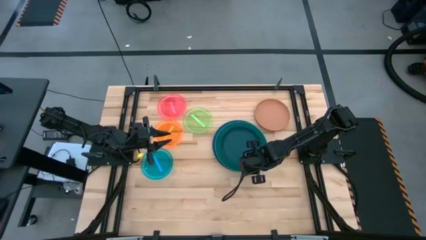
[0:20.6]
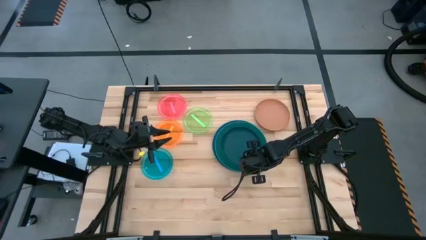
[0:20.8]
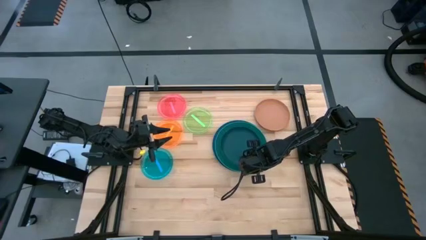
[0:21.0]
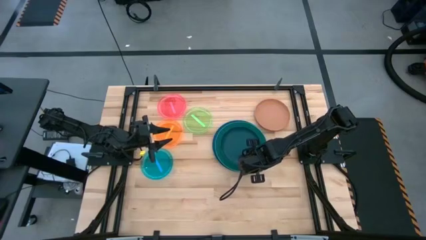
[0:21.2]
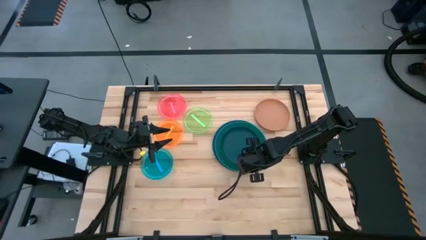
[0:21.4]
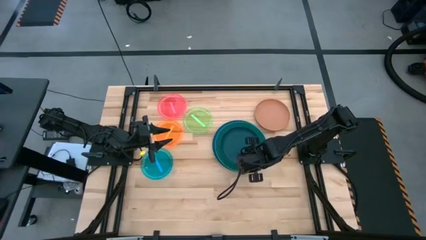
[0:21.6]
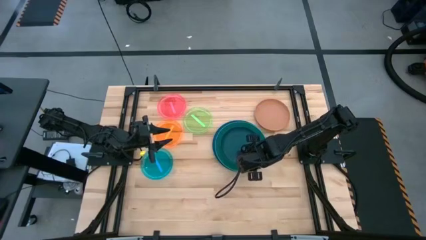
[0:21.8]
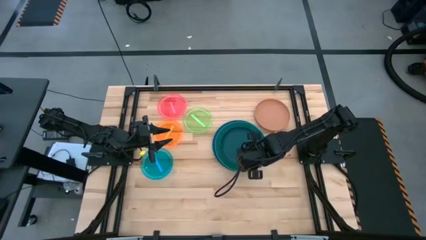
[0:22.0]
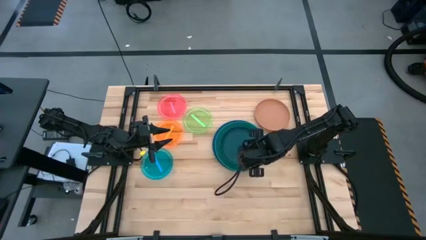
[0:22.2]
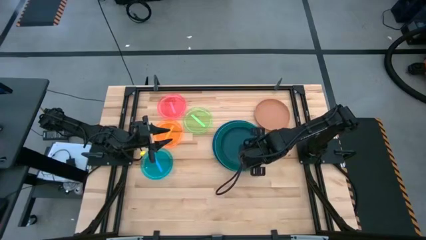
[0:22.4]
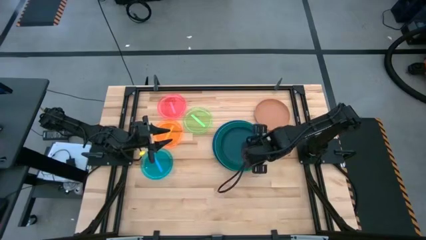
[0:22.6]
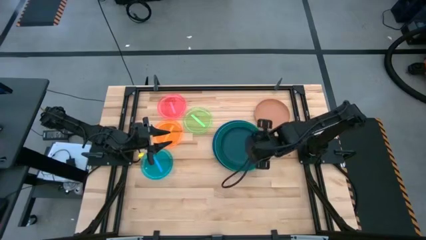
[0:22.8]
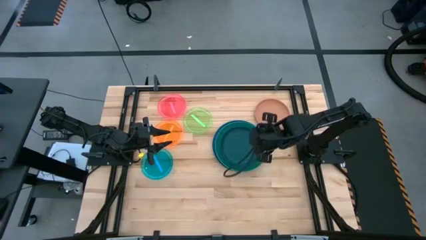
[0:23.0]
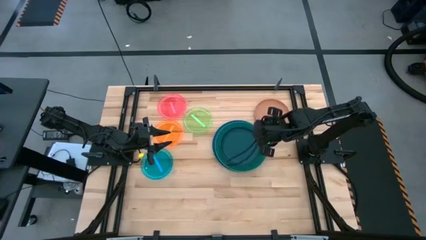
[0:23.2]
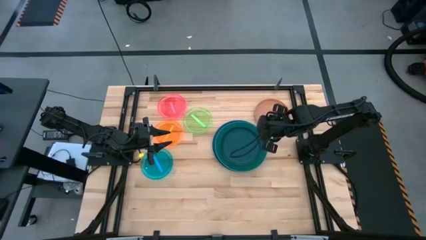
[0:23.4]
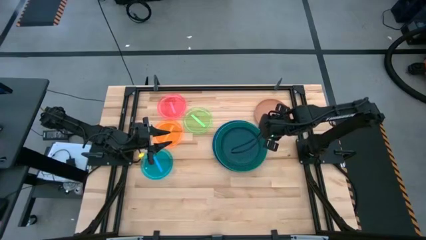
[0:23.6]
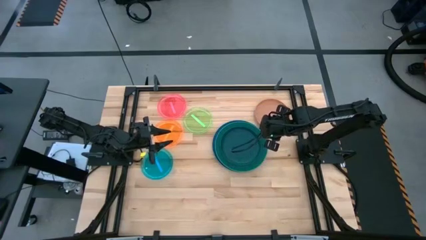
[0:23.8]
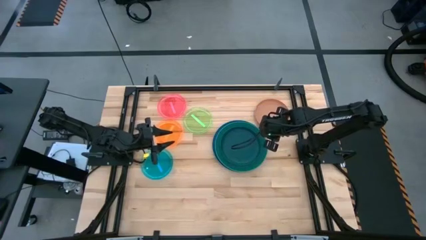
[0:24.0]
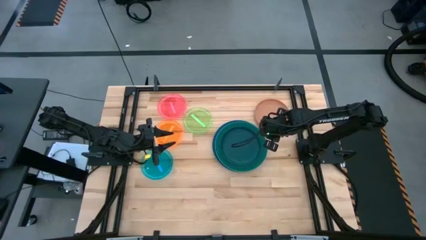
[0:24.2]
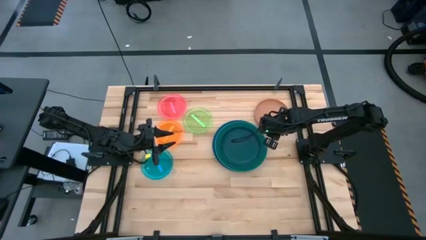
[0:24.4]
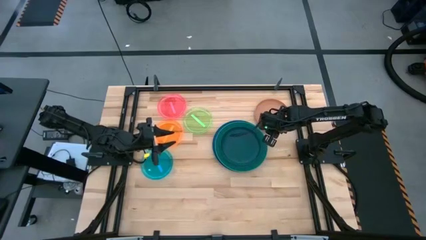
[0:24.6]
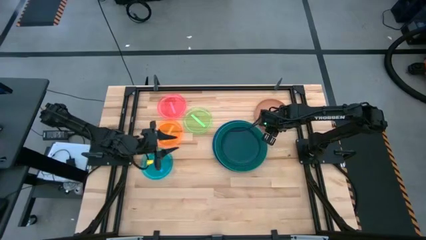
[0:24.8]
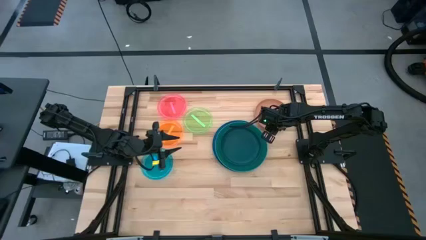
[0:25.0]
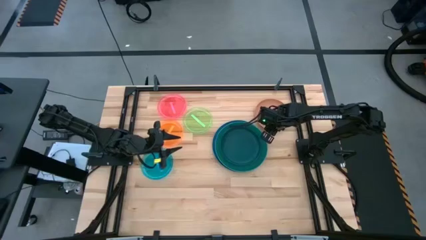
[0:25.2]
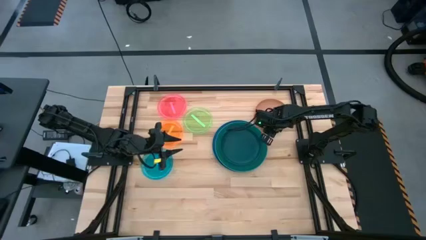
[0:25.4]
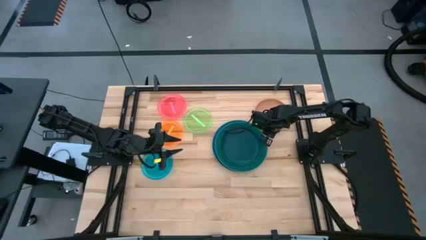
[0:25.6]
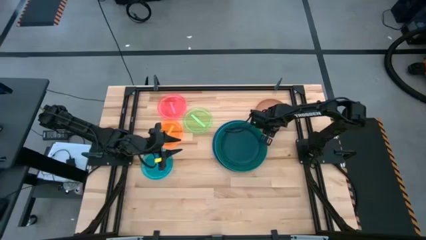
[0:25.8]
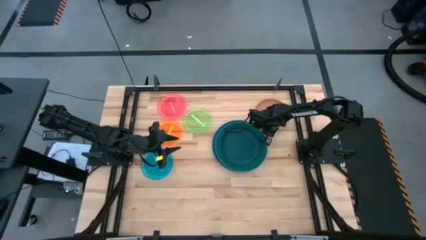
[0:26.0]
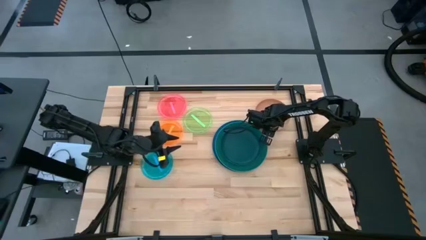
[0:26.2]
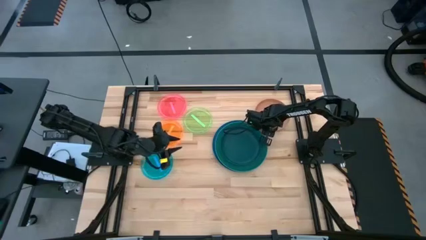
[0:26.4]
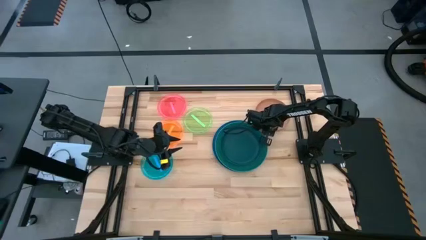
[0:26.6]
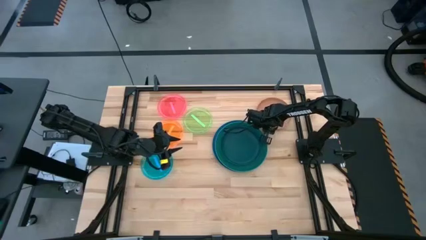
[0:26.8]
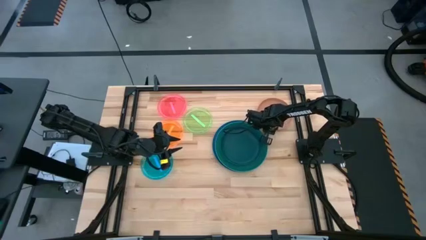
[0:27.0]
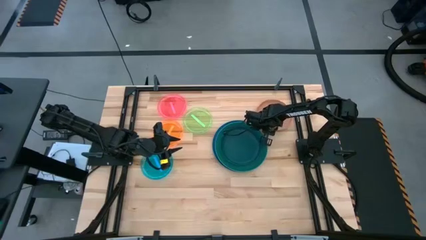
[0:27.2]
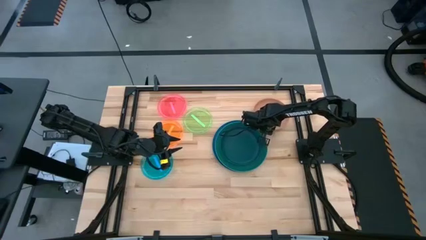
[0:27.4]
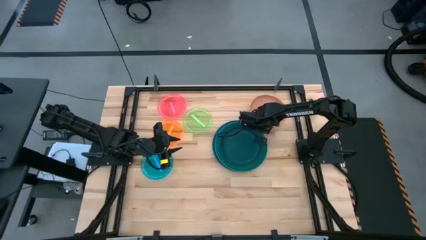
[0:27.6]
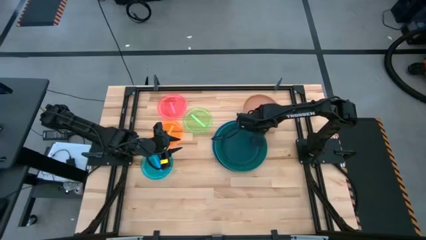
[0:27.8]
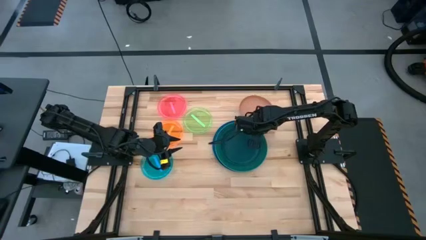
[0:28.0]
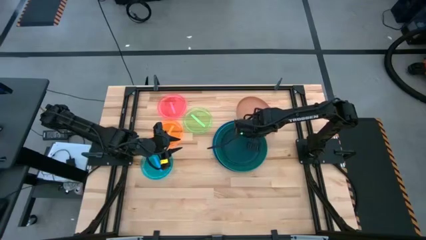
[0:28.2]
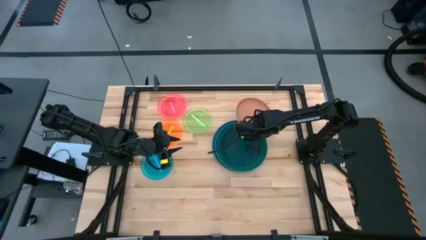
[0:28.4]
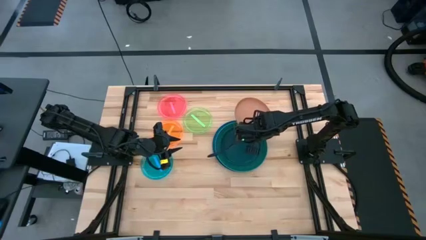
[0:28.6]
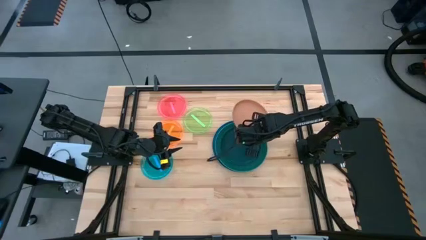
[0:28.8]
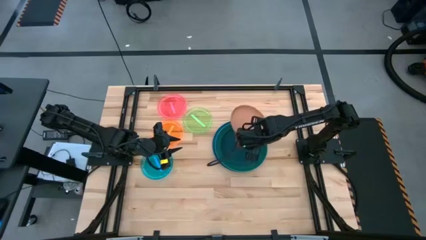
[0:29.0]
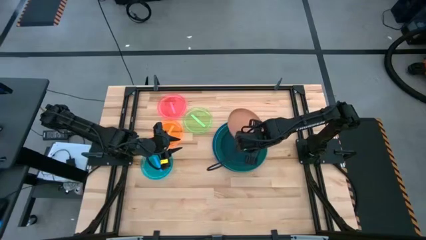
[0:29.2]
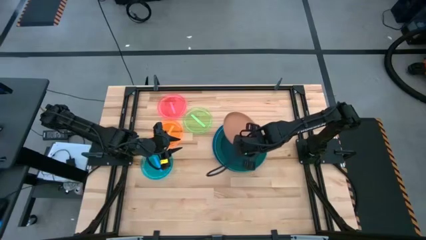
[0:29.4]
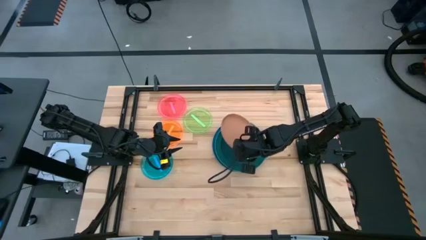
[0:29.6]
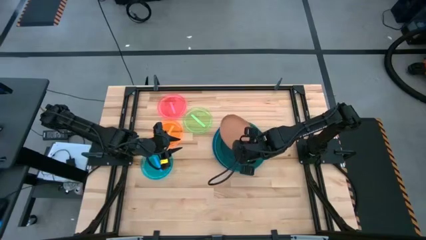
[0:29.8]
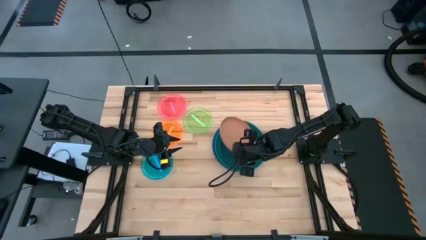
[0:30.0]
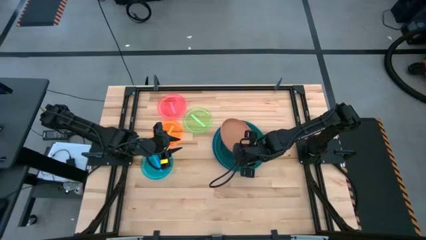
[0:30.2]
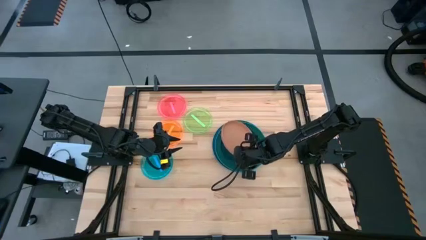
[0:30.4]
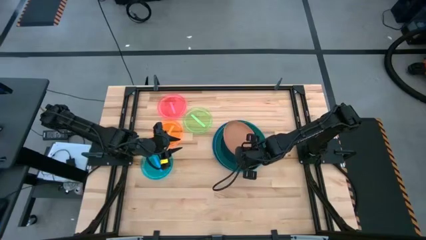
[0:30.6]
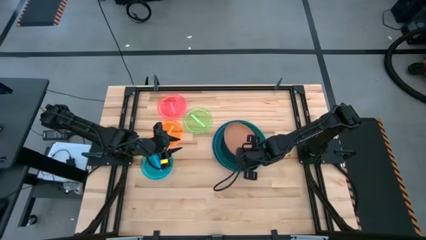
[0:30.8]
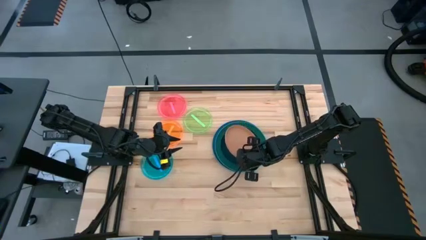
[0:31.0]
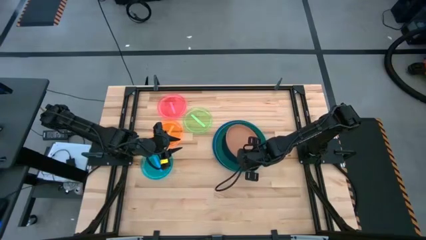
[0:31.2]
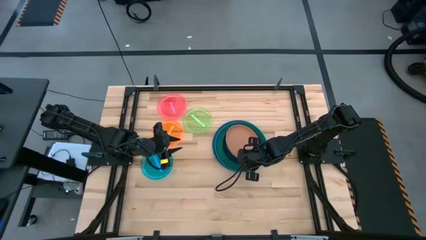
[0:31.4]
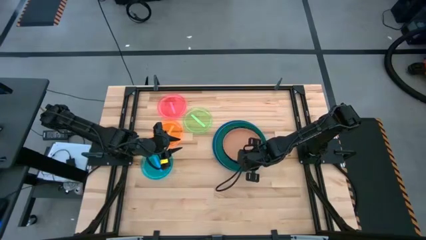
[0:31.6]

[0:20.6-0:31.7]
Task: Stack plastic plates
Stack the brown plate on top of the dark blue plate
